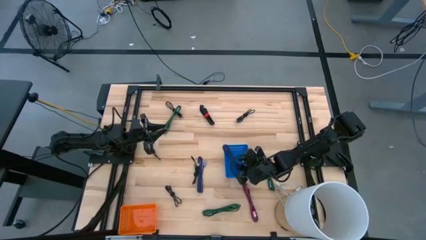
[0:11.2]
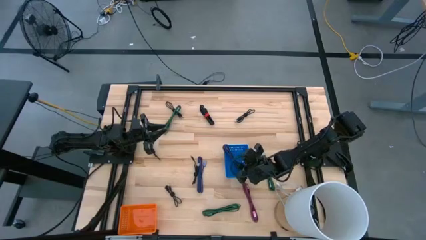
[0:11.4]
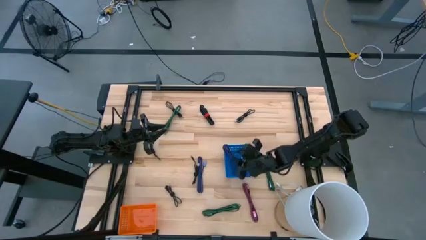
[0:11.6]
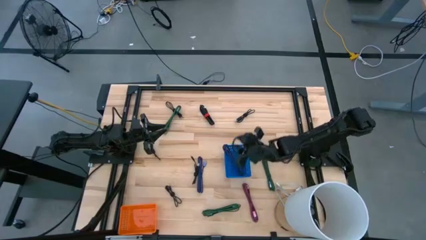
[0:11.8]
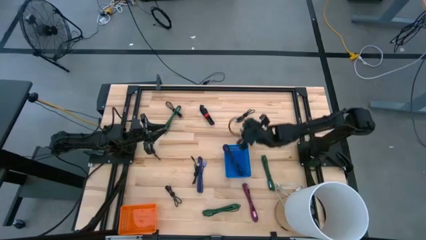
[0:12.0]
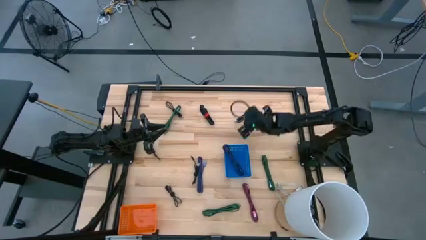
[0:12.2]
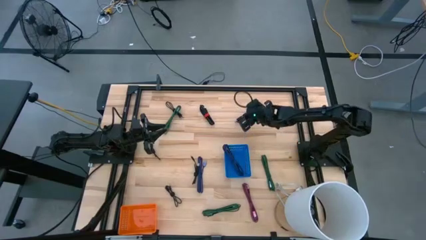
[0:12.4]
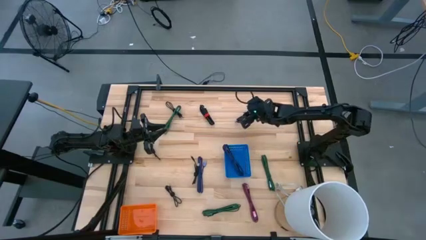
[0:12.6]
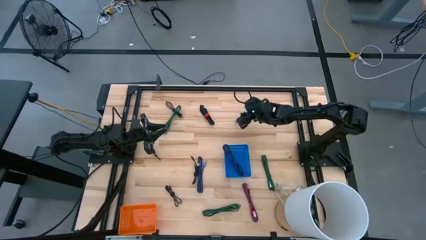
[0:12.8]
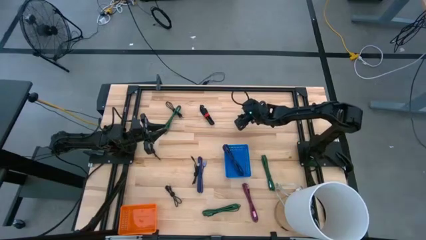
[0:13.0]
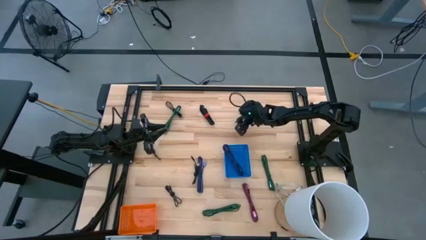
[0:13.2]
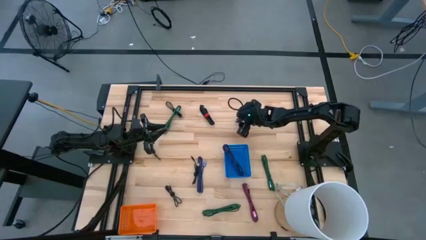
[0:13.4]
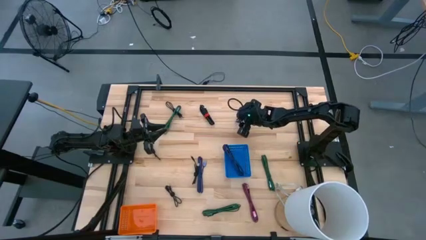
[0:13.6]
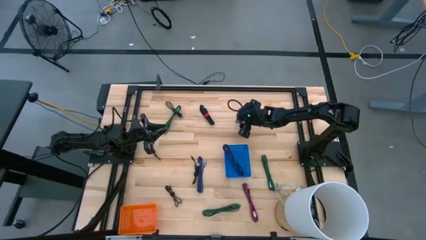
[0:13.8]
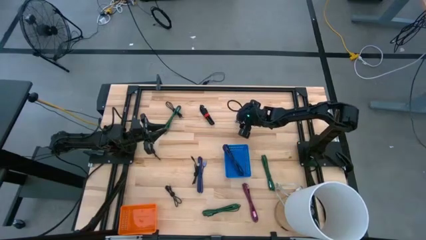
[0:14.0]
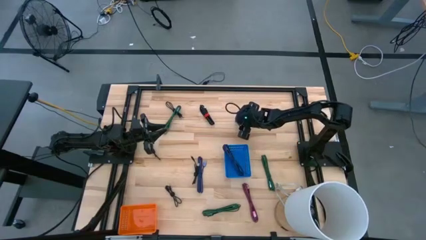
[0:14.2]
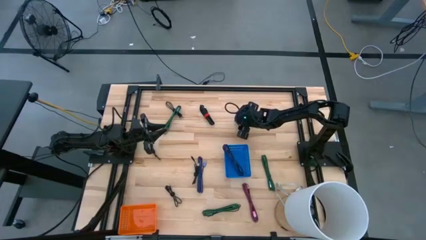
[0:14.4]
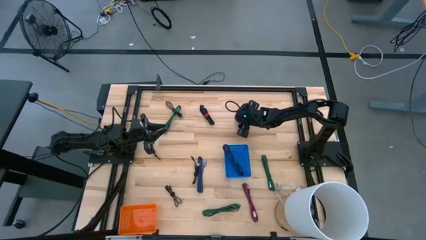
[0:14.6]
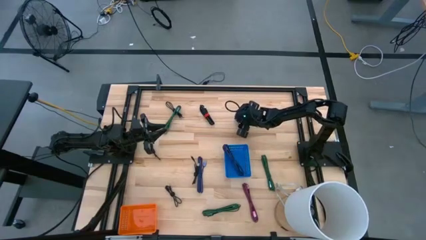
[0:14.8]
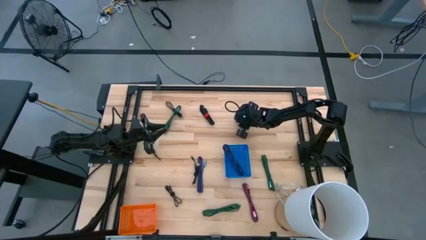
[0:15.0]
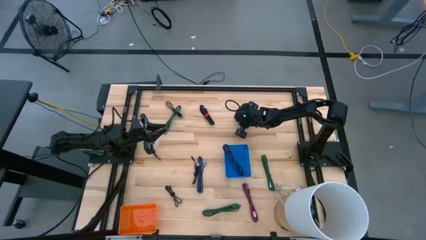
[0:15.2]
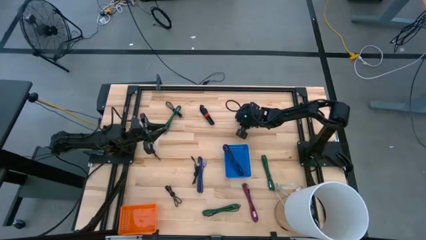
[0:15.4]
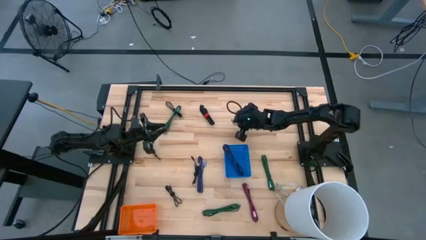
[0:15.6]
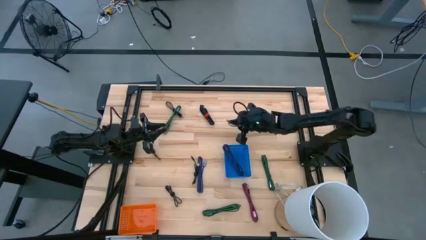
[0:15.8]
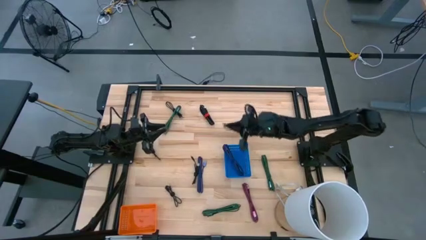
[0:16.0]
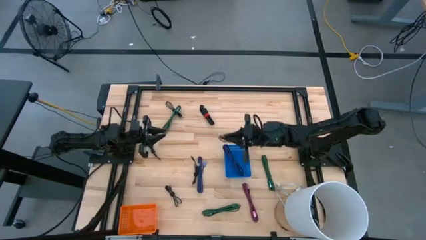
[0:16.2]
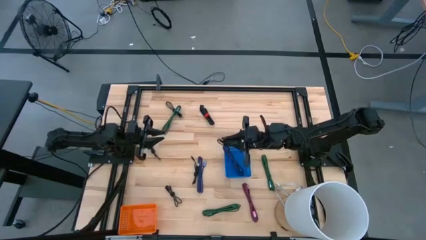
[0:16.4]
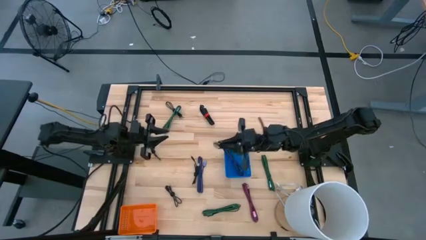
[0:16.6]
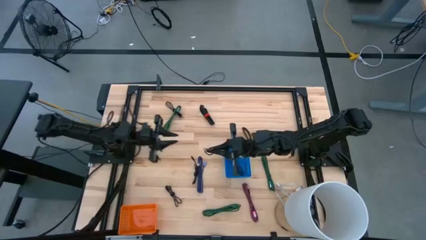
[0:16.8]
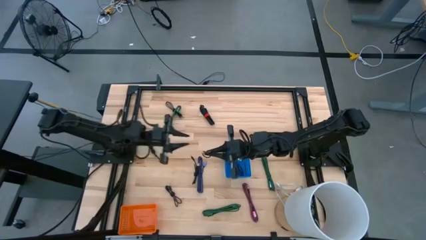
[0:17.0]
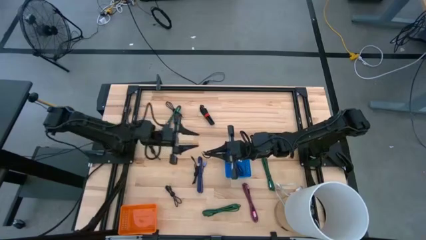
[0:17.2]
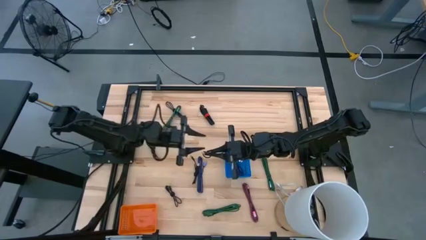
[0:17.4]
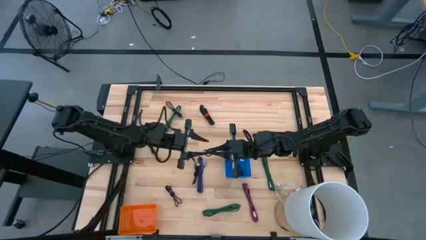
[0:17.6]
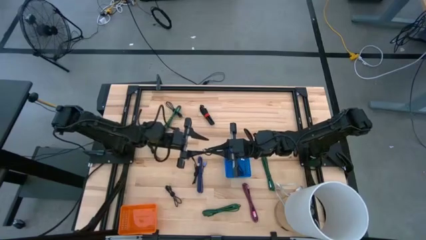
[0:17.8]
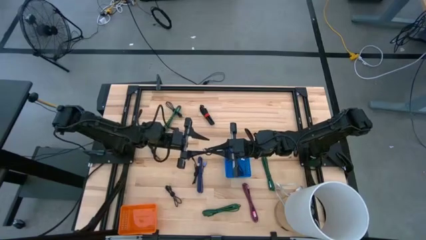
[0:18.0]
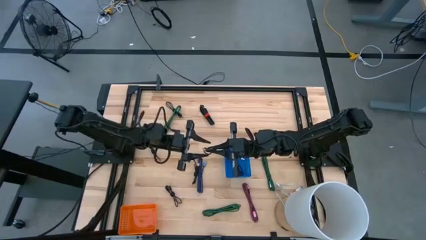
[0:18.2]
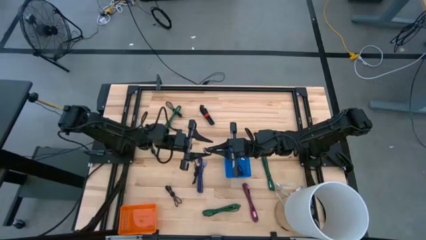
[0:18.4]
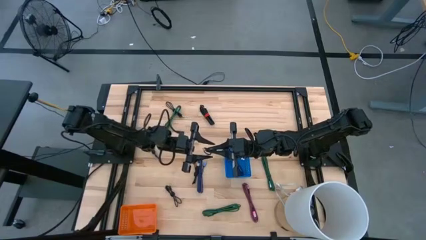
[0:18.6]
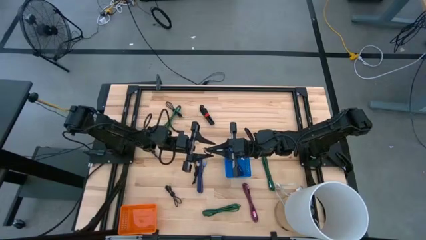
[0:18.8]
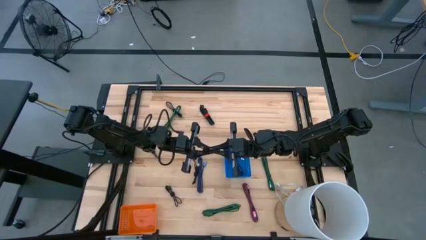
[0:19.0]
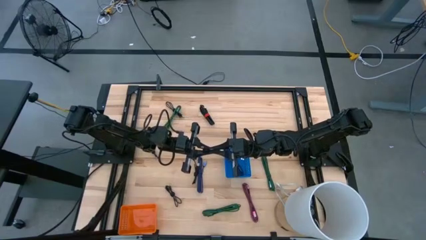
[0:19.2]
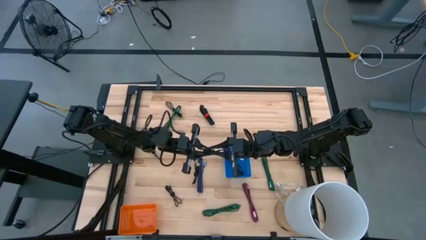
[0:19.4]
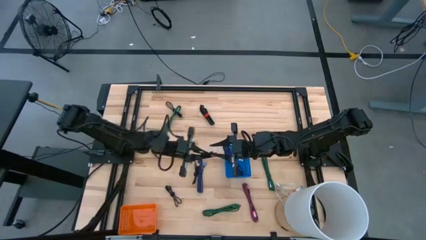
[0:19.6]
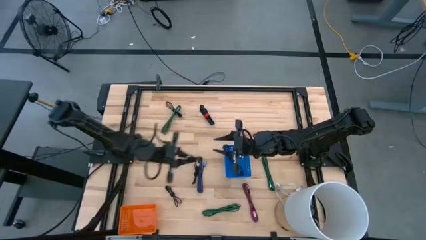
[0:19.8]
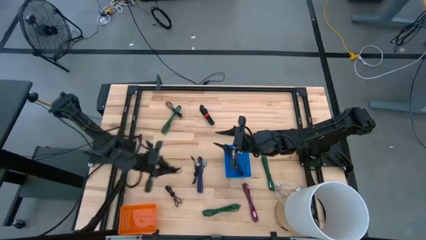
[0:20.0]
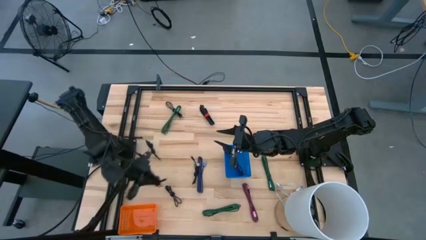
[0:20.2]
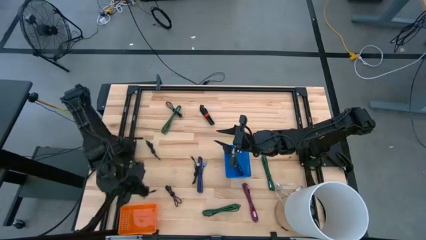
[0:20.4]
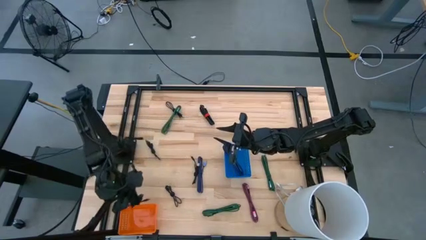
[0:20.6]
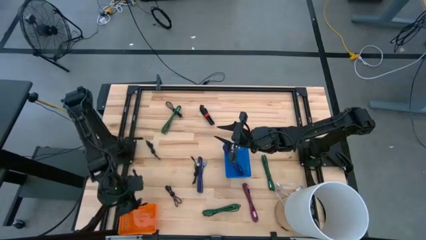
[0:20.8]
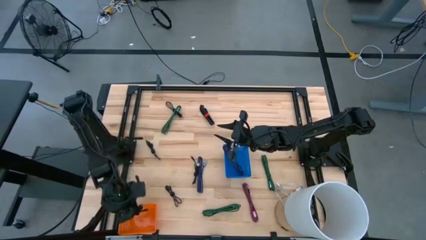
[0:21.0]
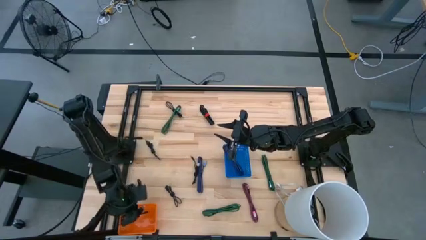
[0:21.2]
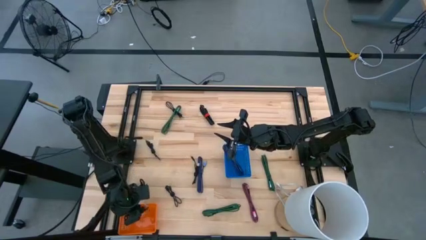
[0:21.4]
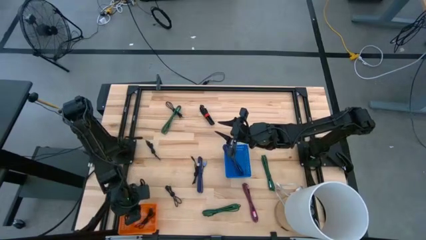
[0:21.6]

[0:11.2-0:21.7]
Task: Pick & Place USB Port
Put the black charger cable into the orange bin

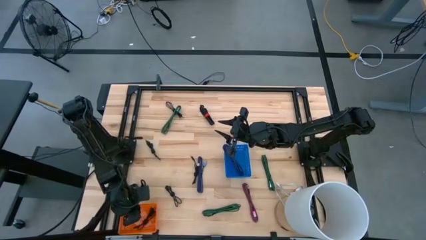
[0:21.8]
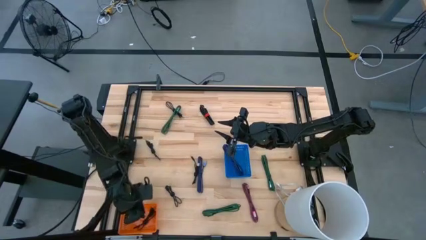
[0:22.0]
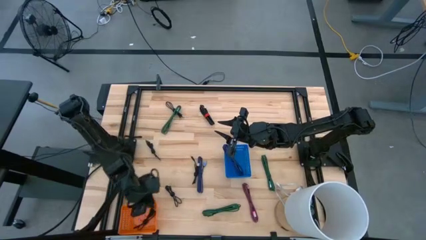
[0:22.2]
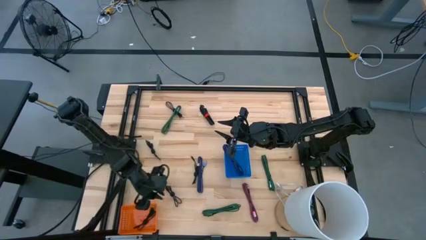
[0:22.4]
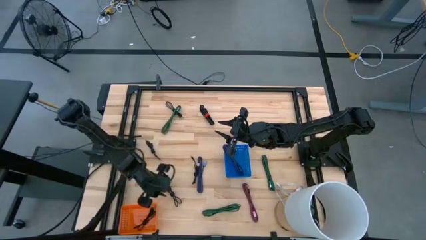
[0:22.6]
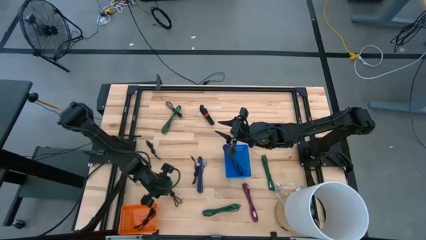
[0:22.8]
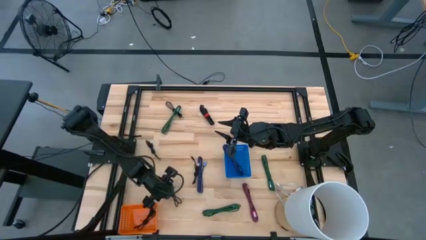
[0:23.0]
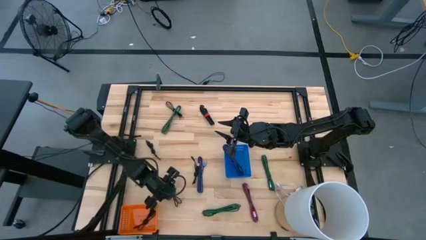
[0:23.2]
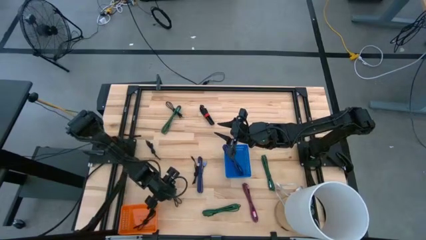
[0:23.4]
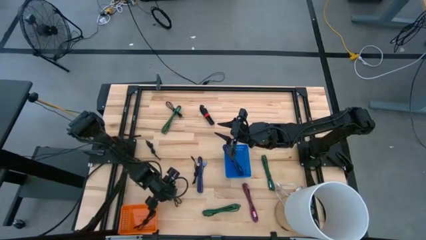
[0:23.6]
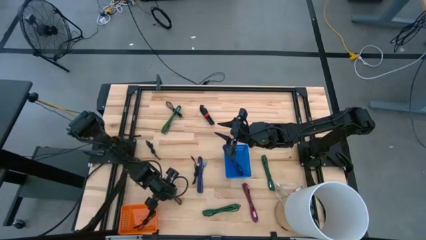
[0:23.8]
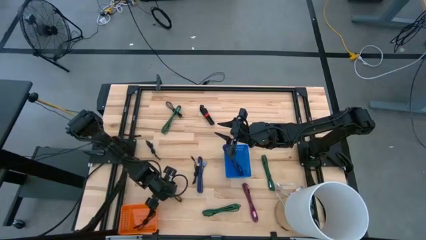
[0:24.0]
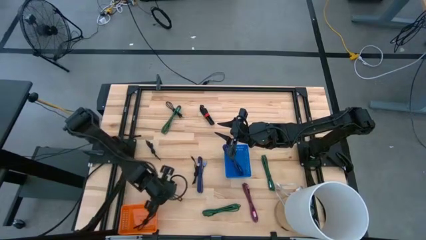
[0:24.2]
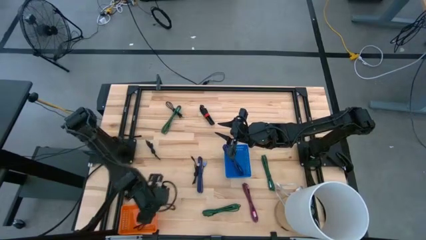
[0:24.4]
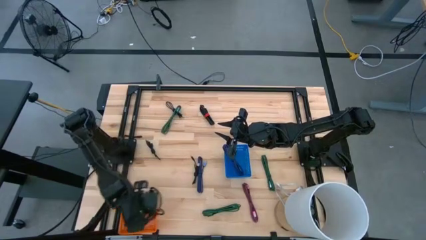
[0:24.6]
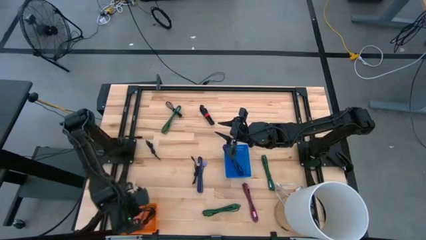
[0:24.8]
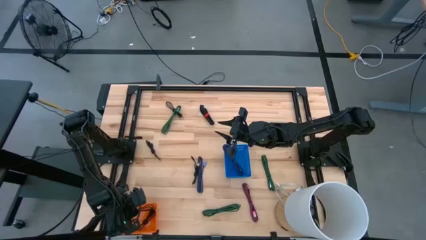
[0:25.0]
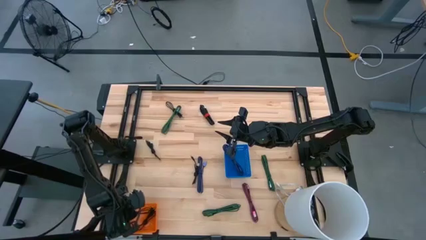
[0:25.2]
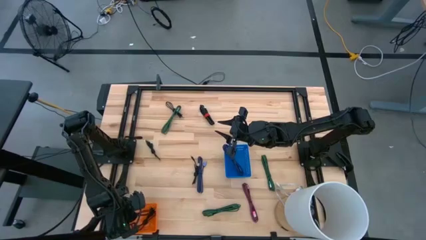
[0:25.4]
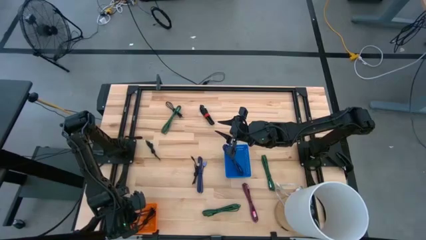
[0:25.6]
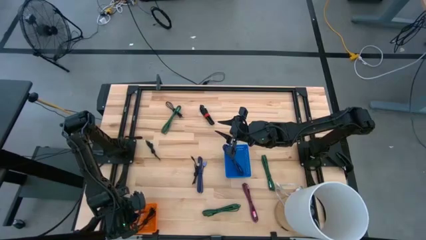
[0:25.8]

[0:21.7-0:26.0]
Put the black charger cable into the orange bin

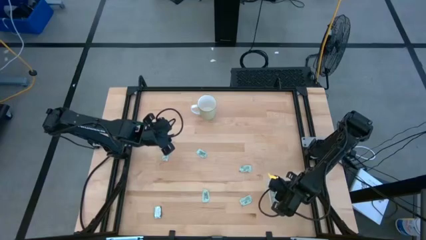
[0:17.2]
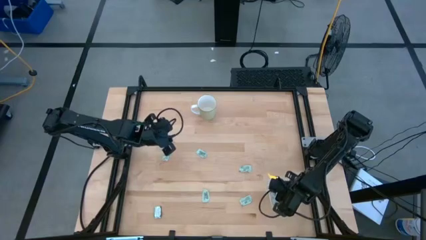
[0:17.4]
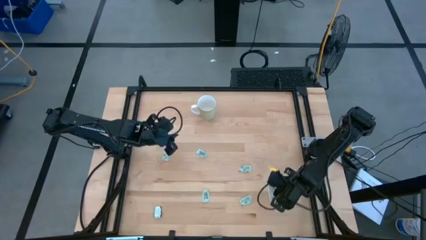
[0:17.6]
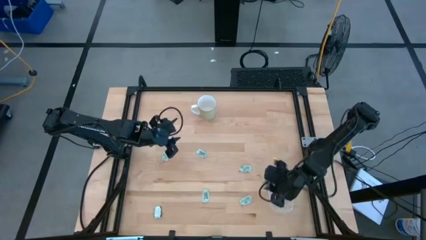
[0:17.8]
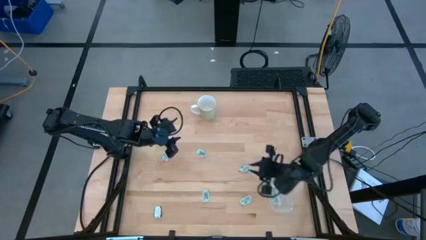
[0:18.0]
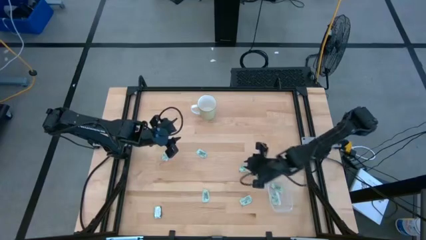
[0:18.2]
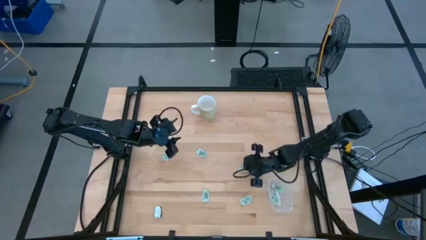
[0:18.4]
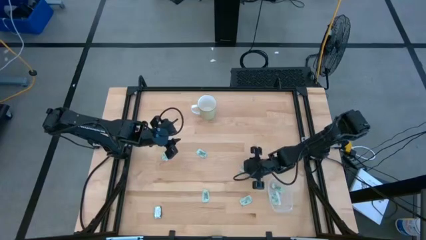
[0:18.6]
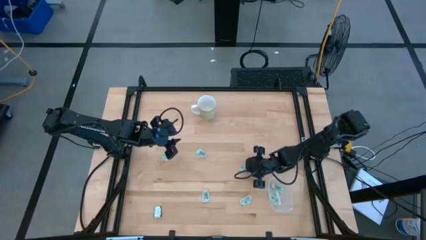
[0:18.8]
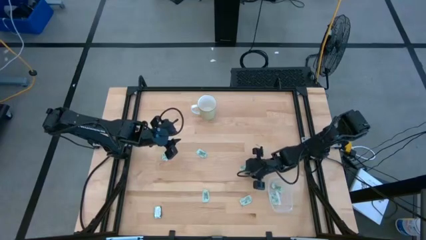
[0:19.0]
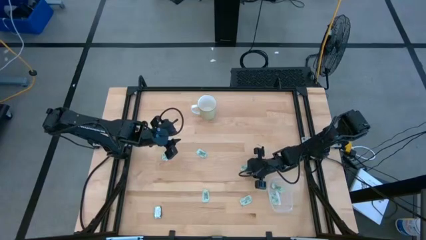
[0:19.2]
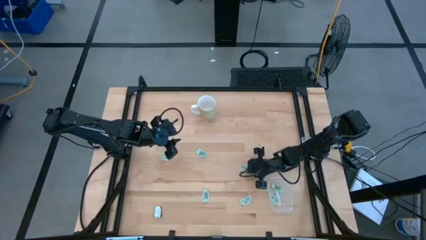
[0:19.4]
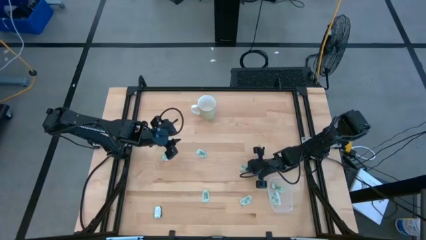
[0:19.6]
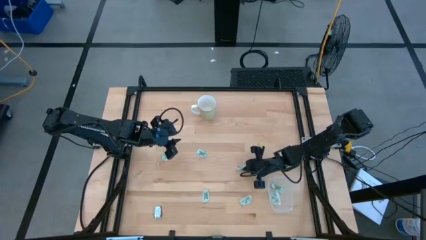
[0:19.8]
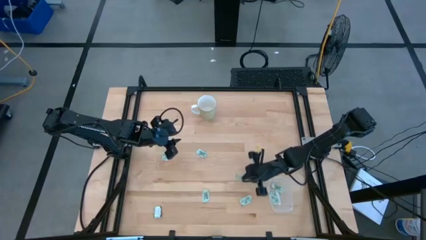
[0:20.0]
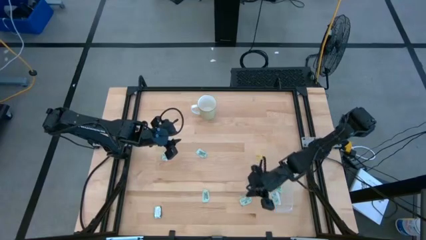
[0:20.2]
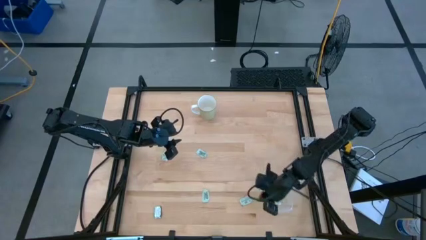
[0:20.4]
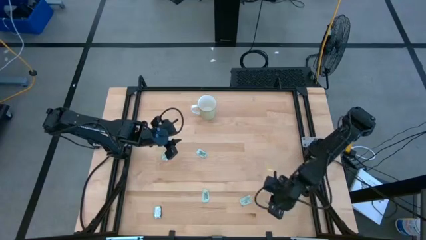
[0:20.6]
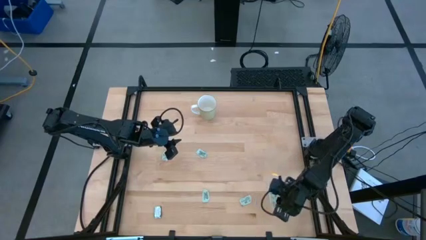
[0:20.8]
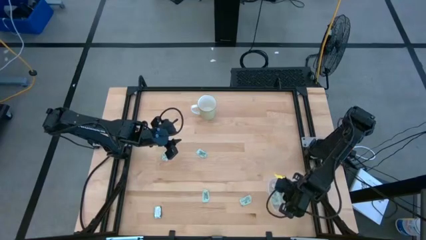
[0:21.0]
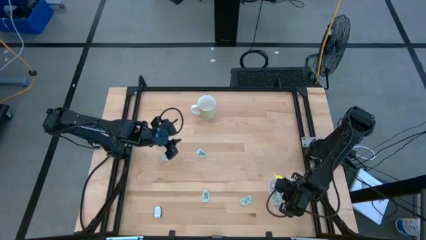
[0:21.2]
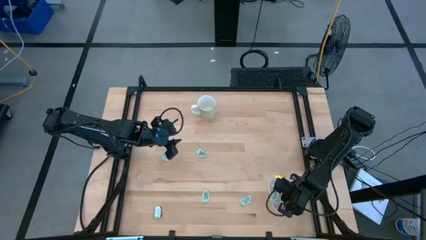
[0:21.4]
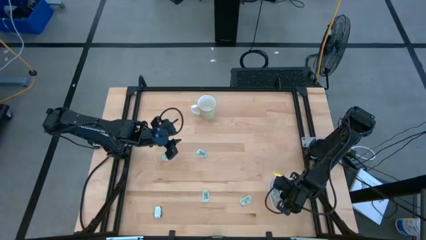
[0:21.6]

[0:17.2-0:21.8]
Task: Pick and place Stevia / Truvia into bins
Put the stevia packet into the transparent bin
